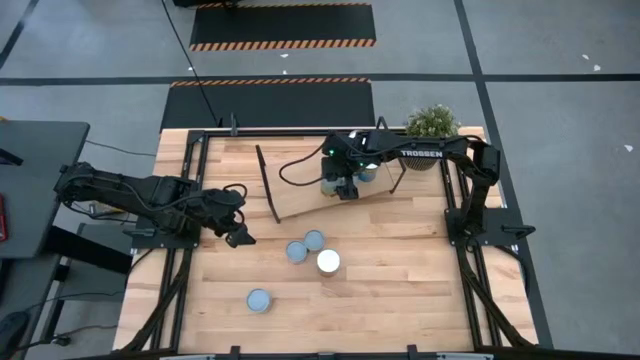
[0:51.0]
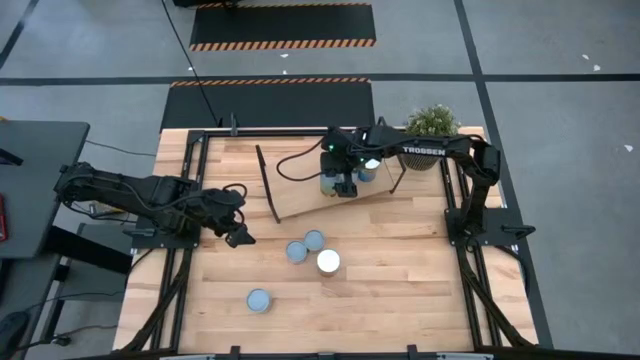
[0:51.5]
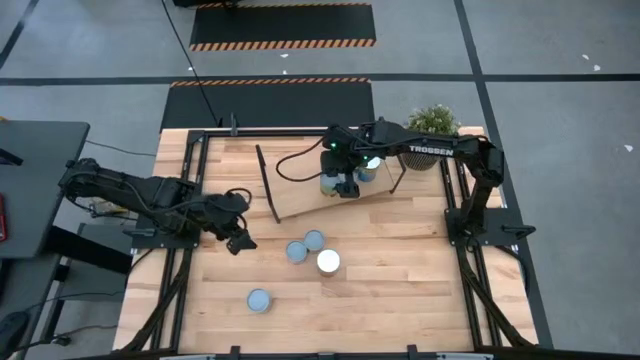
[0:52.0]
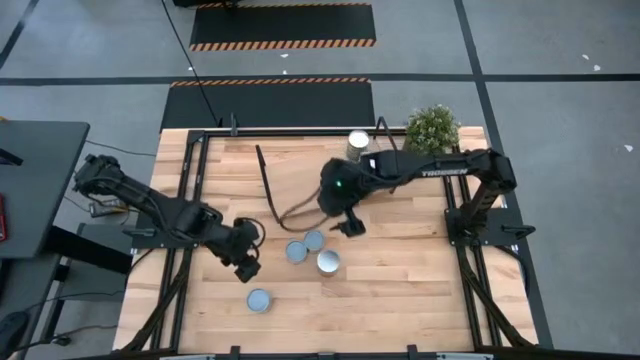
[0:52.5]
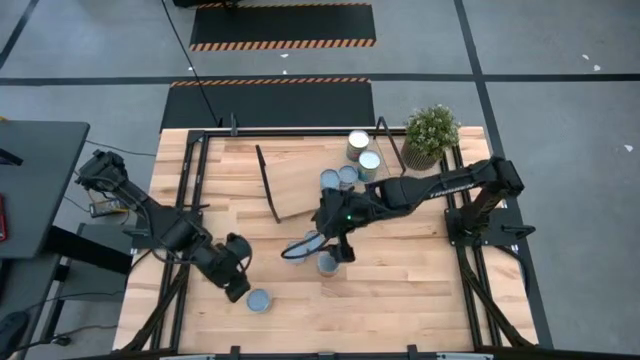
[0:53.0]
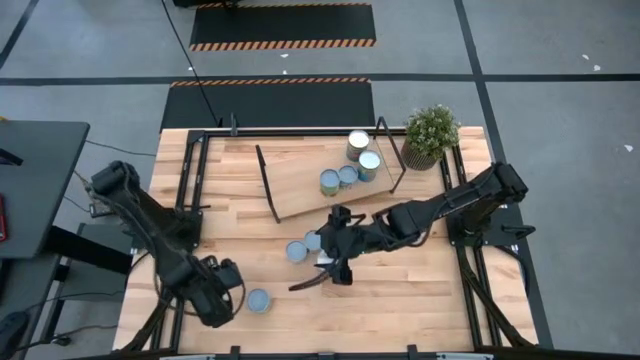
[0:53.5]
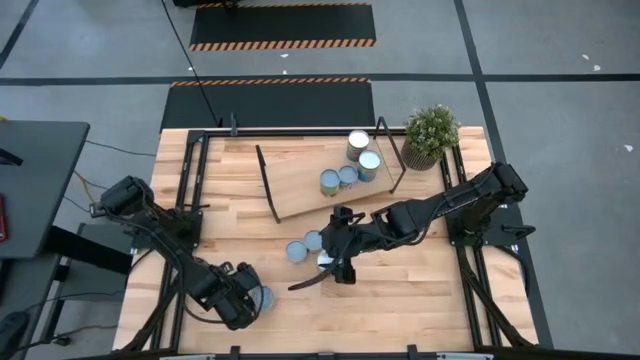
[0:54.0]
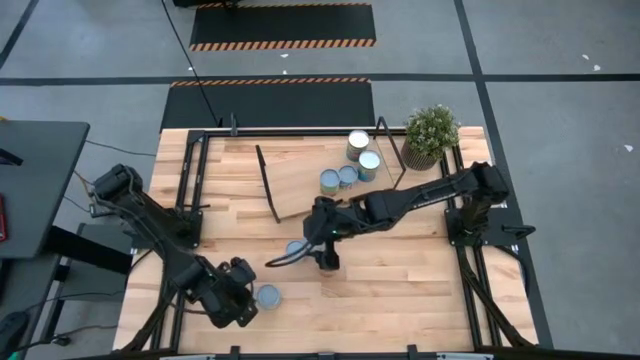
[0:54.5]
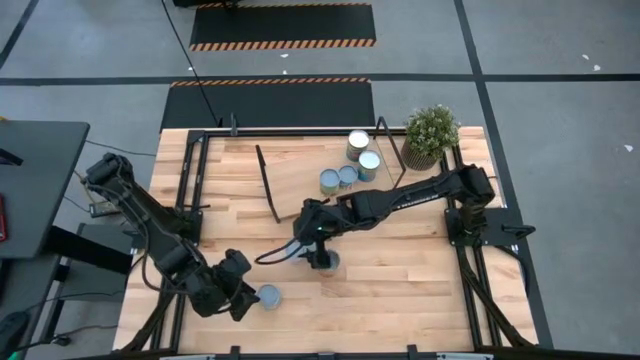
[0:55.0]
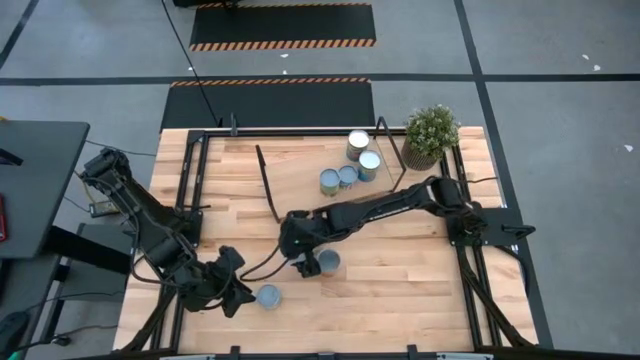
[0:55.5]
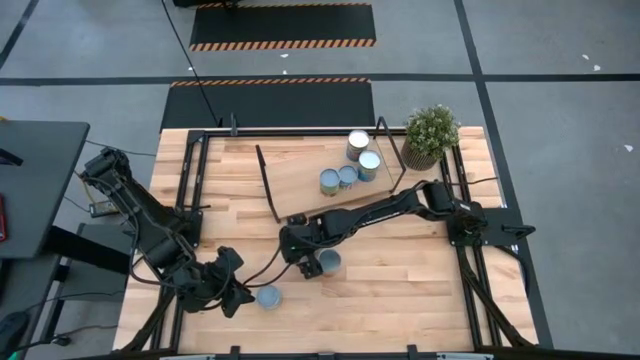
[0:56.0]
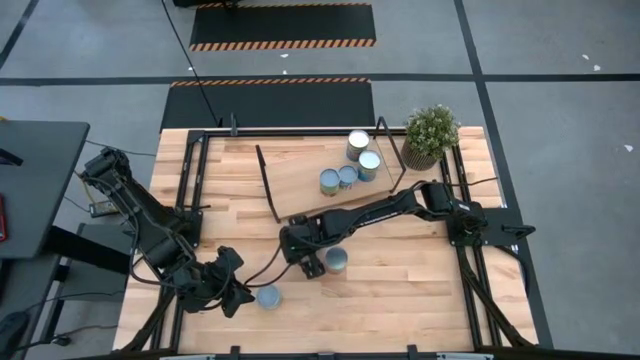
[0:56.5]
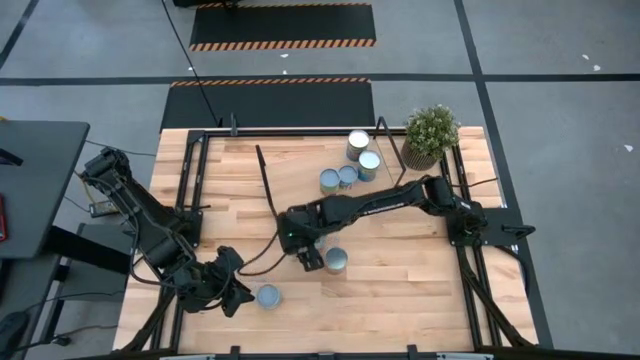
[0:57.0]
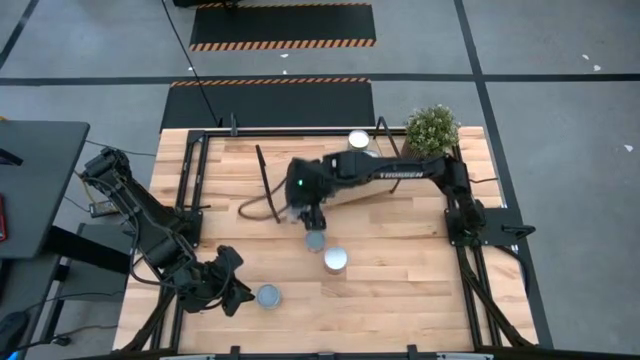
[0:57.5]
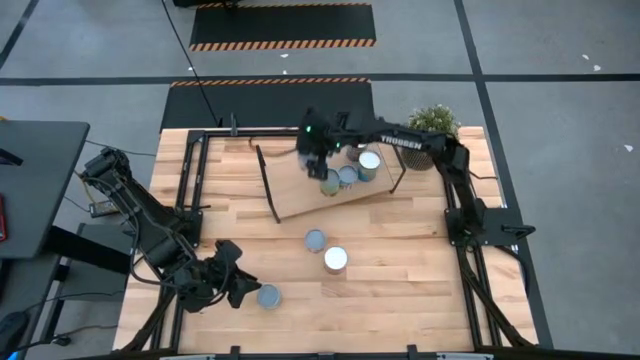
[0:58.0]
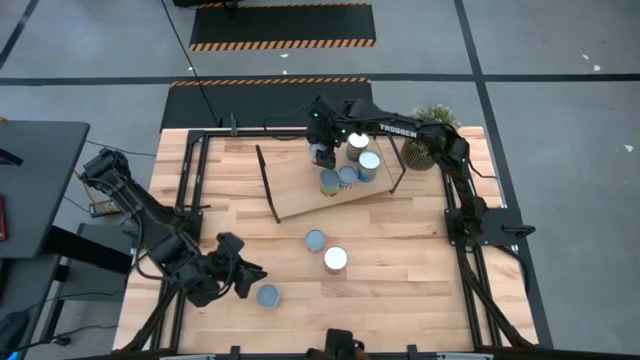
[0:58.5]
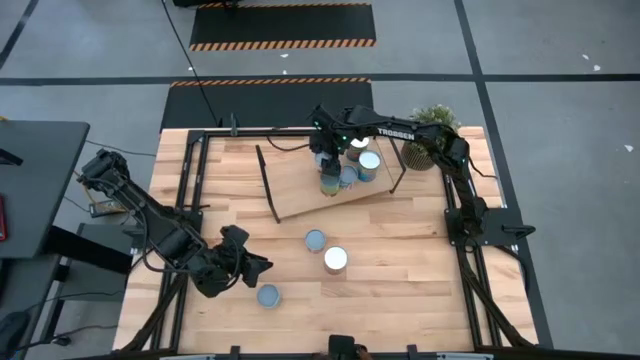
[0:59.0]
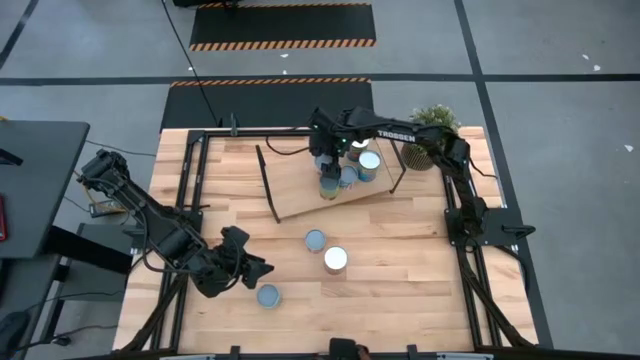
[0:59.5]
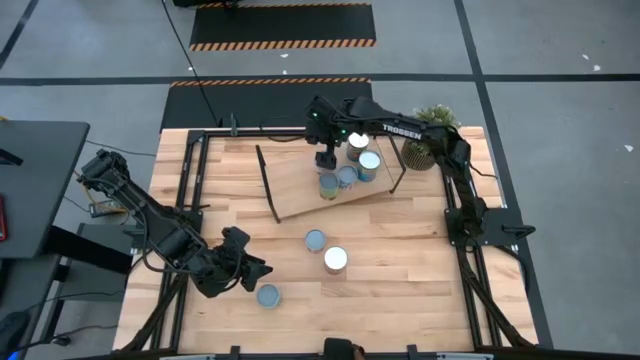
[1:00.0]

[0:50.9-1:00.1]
Task: Pick and place cans onto a shelf
Put the red can on the shelf

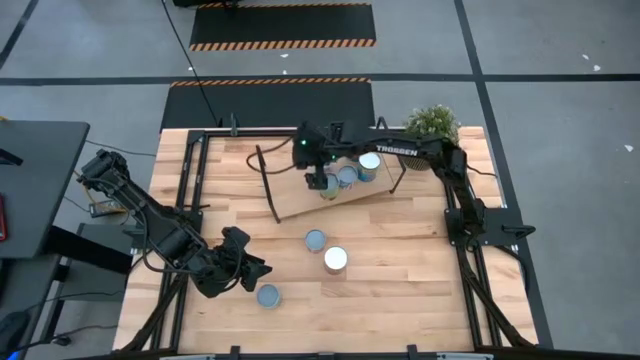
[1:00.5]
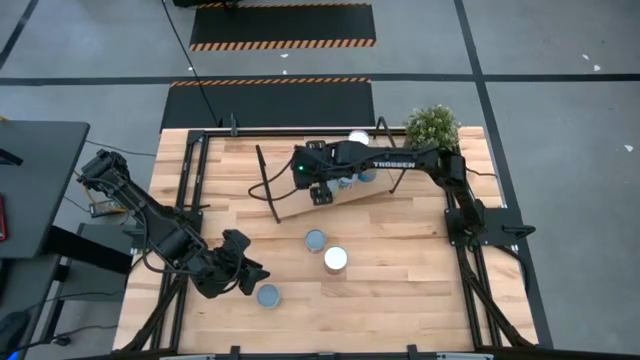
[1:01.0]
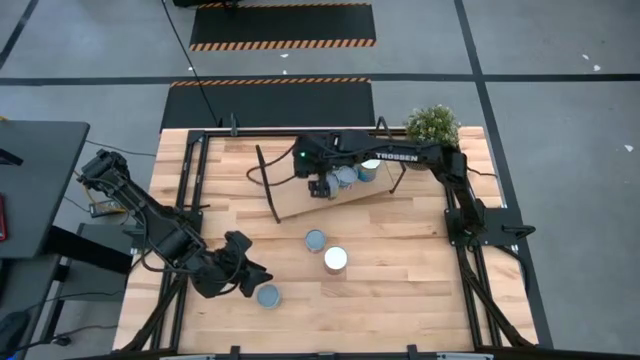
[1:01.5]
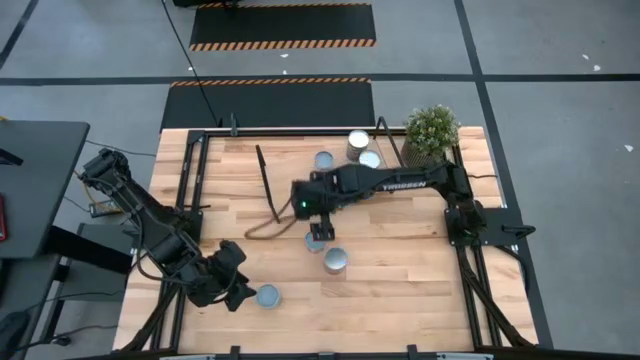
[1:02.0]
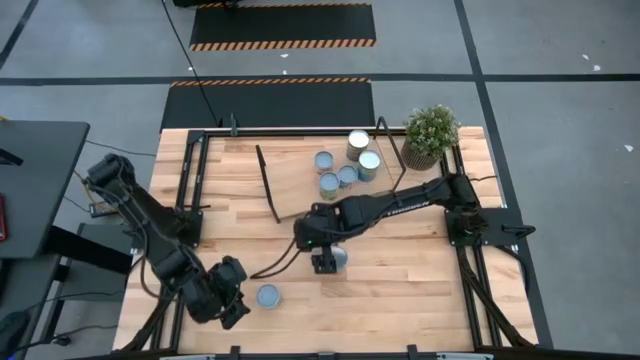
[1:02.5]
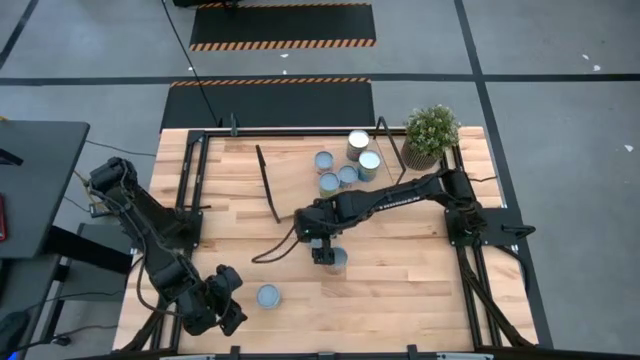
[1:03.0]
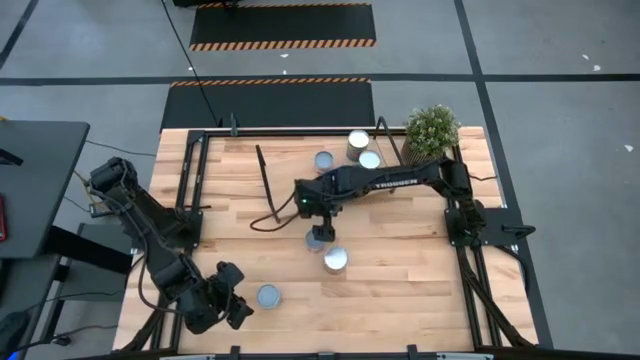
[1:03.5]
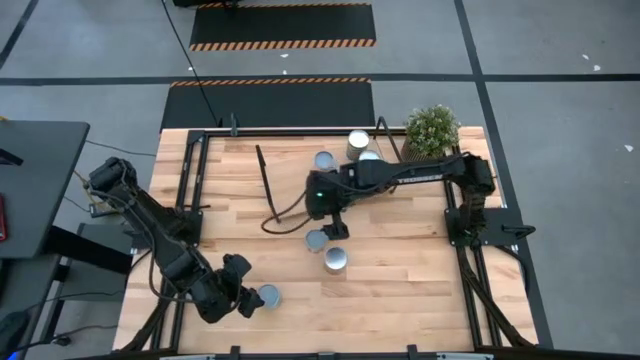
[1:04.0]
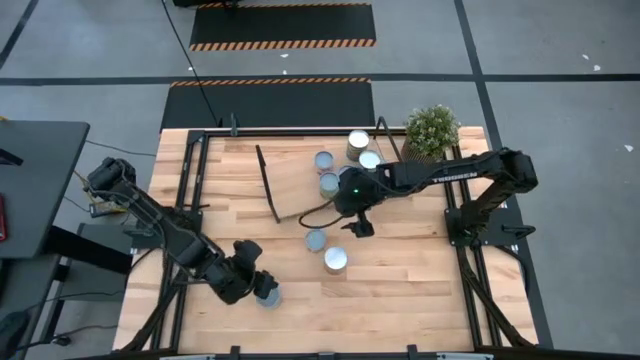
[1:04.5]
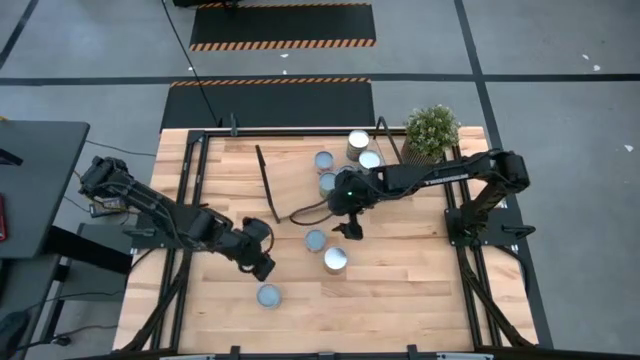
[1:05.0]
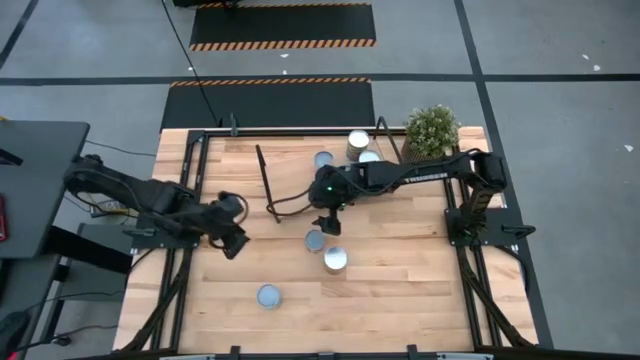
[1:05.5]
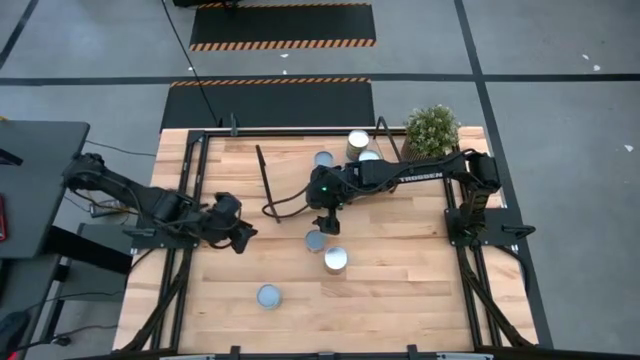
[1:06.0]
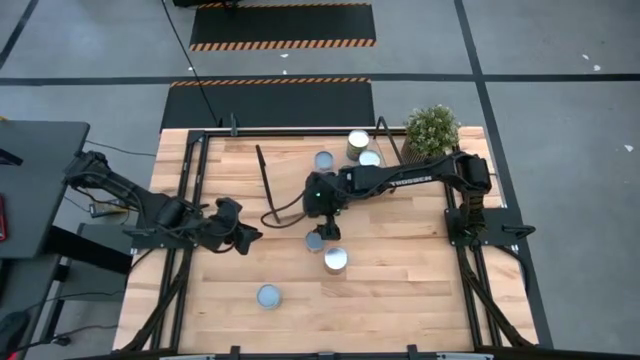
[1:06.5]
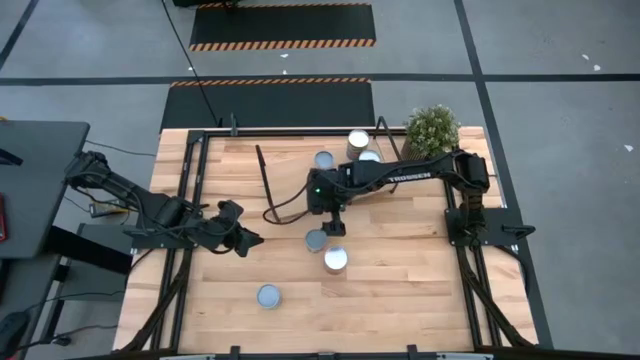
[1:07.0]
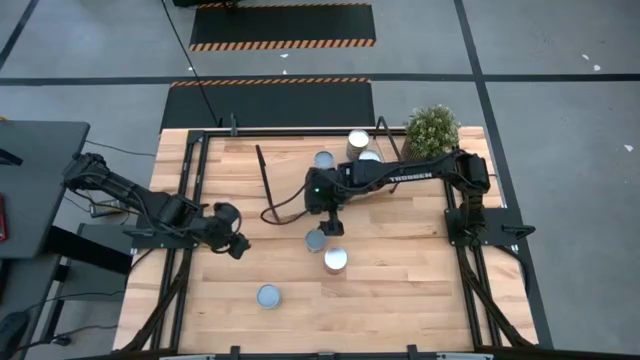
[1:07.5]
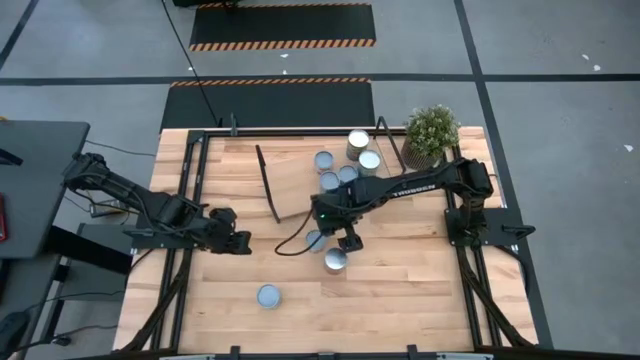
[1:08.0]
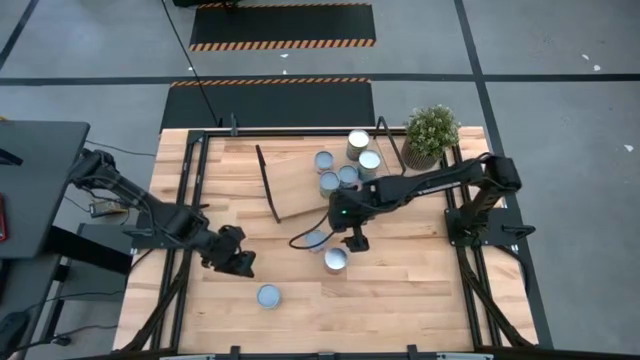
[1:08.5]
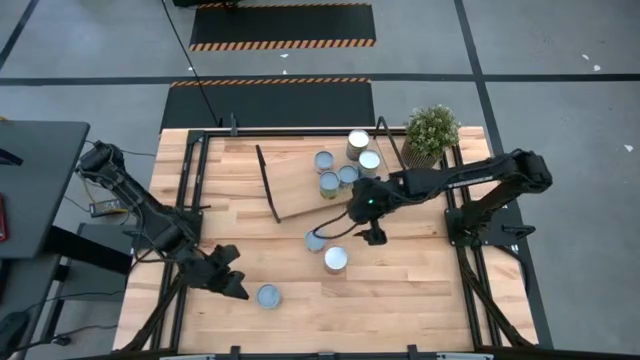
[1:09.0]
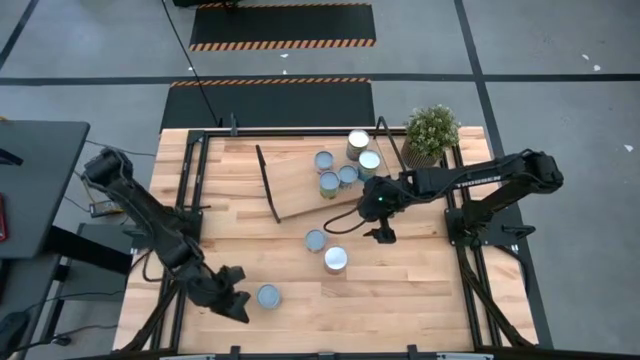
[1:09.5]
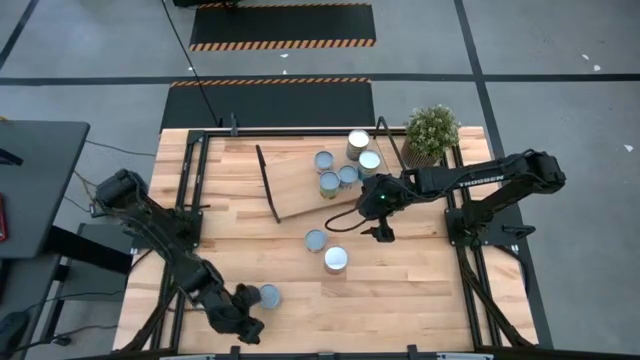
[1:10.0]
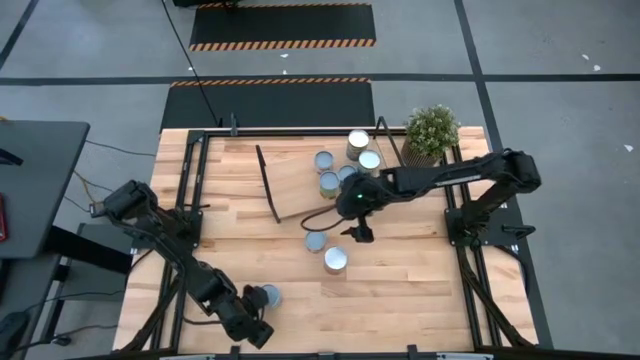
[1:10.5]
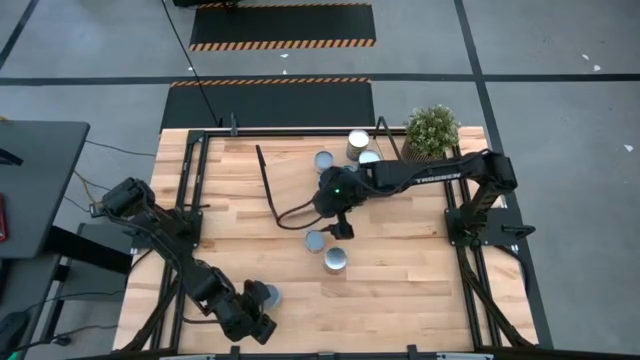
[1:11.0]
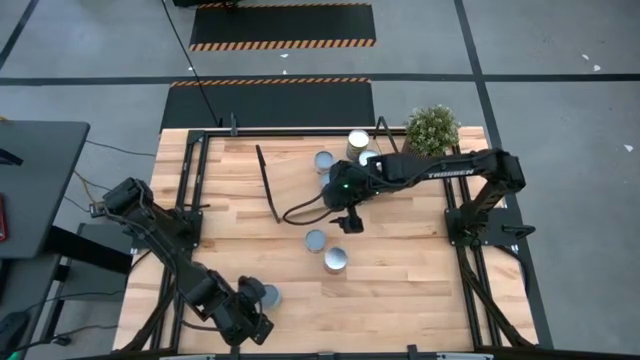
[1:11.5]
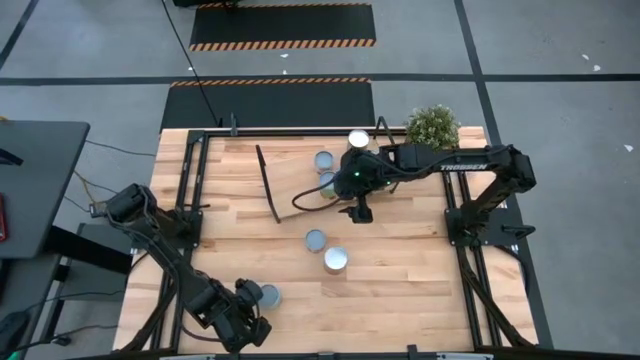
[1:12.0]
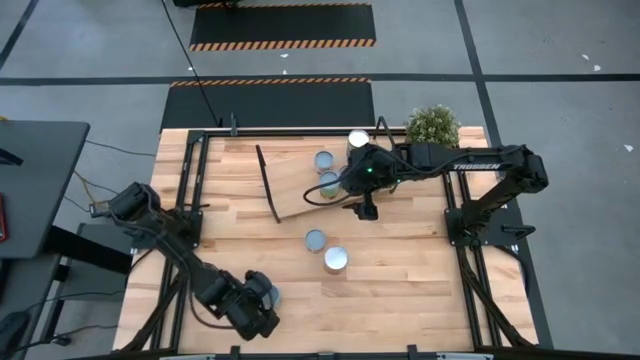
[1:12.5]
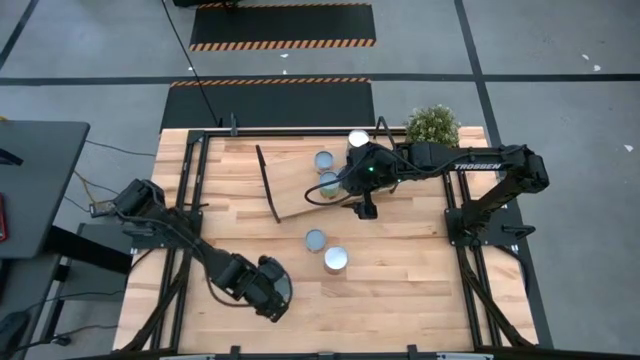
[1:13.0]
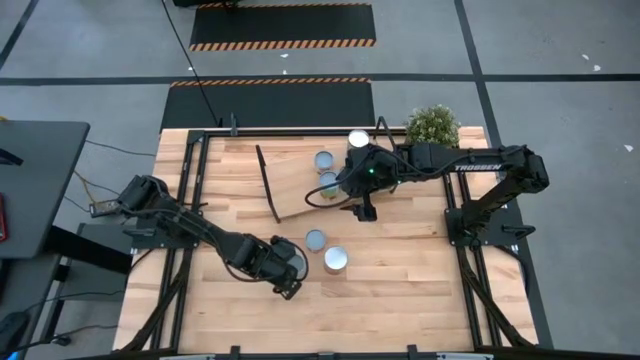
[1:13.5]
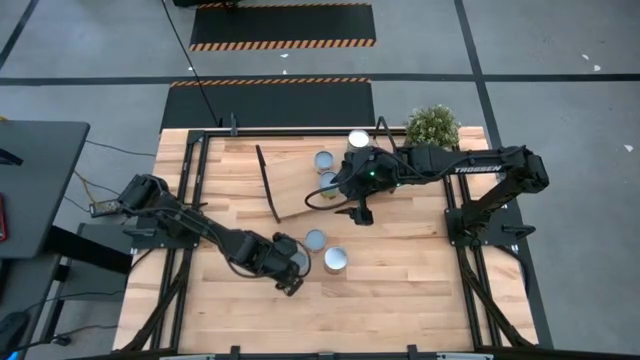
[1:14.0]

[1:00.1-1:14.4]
Adjust the pink can on the table
